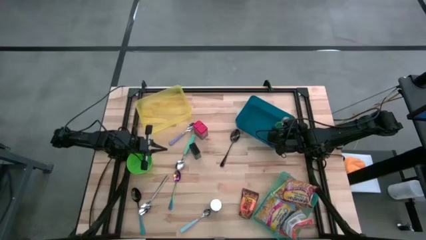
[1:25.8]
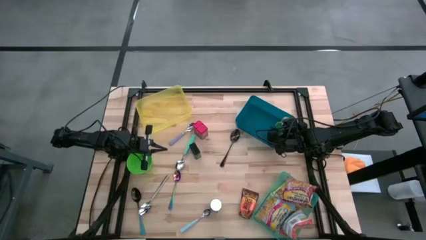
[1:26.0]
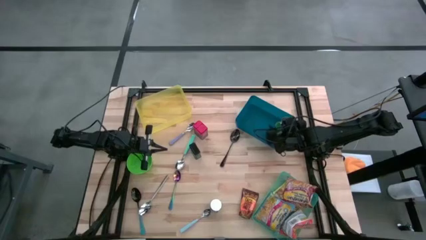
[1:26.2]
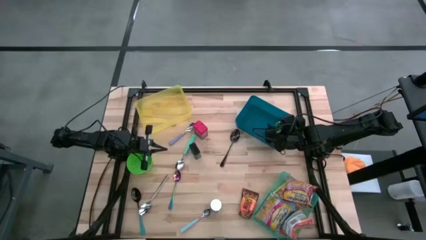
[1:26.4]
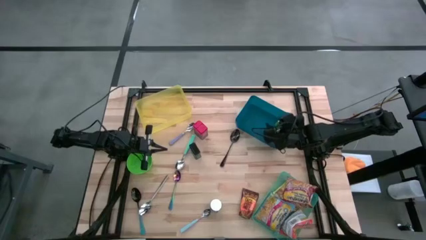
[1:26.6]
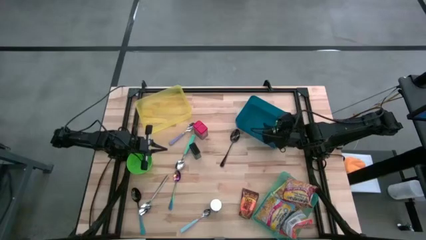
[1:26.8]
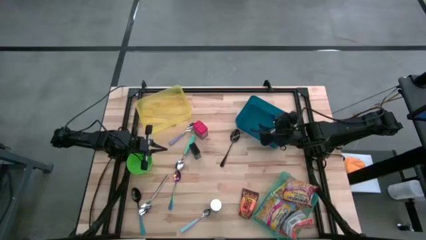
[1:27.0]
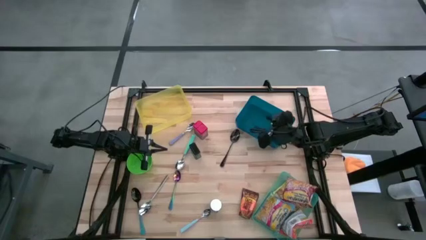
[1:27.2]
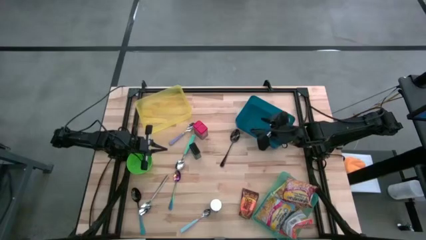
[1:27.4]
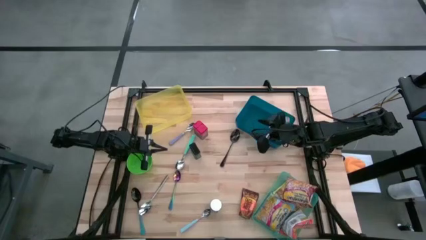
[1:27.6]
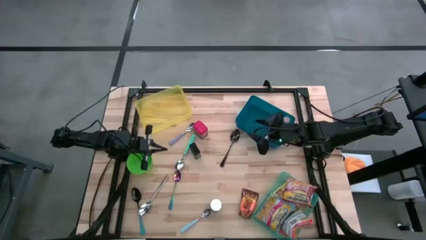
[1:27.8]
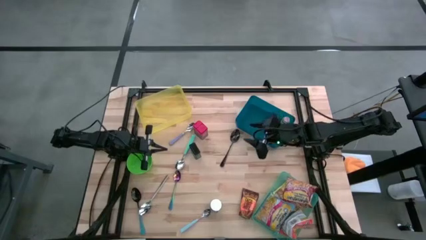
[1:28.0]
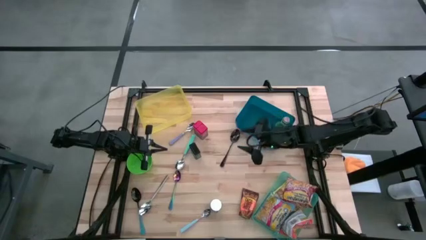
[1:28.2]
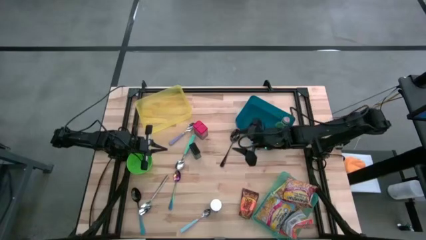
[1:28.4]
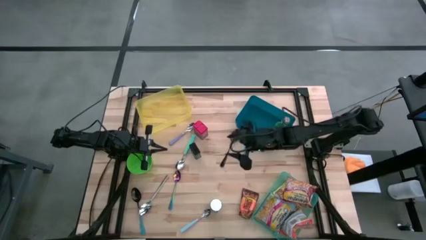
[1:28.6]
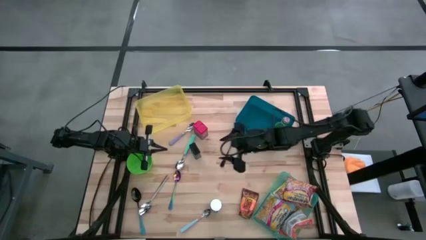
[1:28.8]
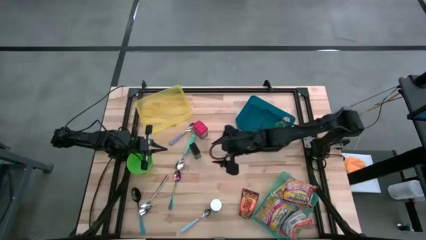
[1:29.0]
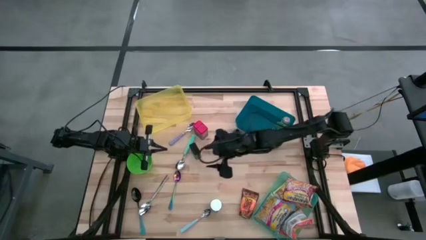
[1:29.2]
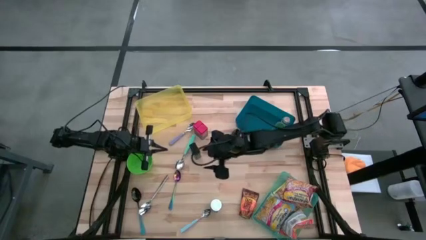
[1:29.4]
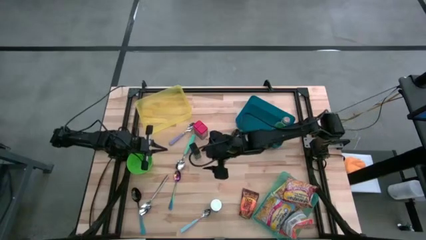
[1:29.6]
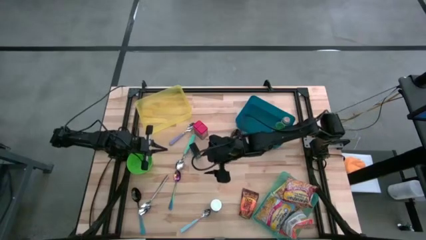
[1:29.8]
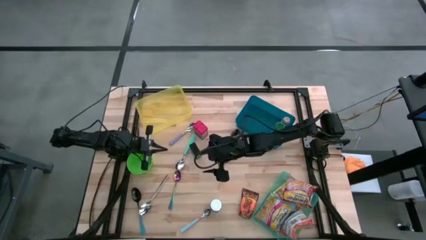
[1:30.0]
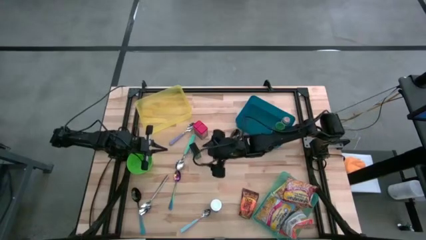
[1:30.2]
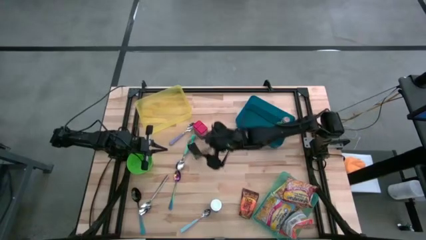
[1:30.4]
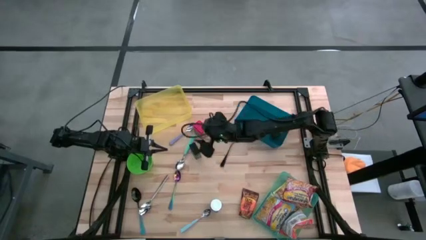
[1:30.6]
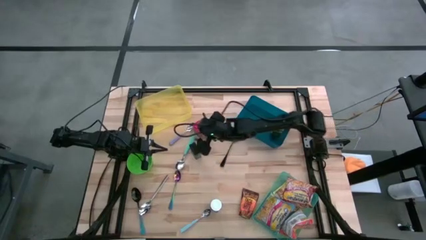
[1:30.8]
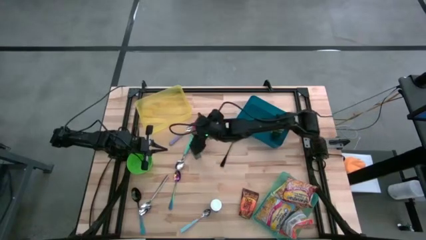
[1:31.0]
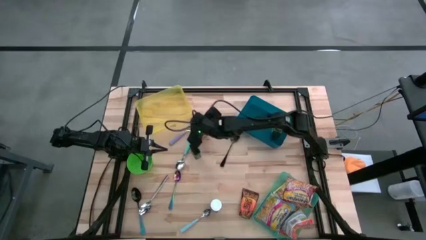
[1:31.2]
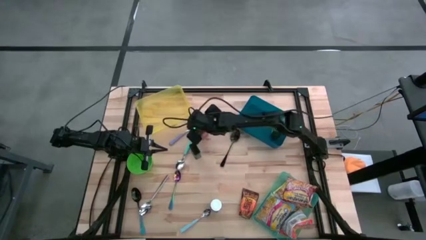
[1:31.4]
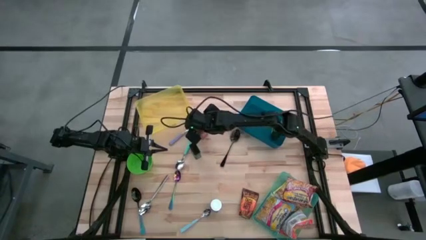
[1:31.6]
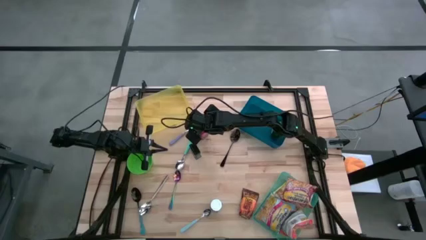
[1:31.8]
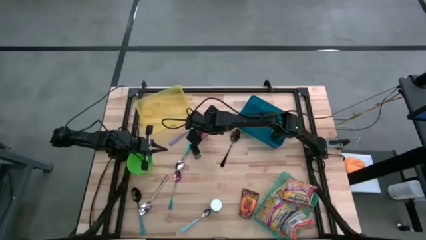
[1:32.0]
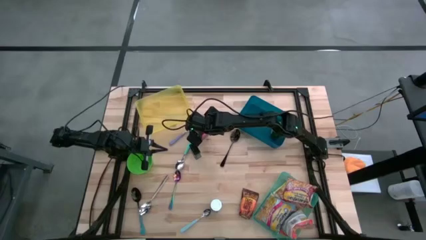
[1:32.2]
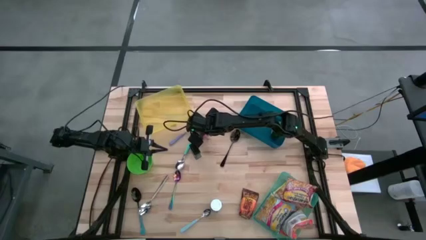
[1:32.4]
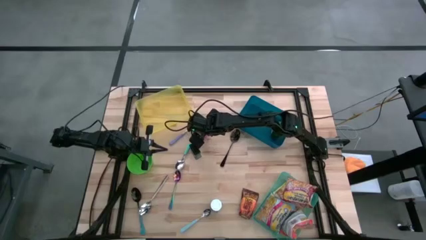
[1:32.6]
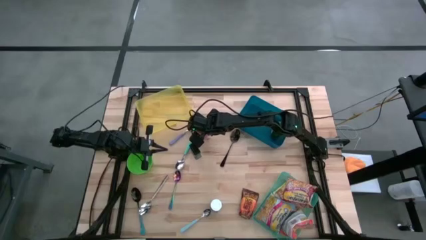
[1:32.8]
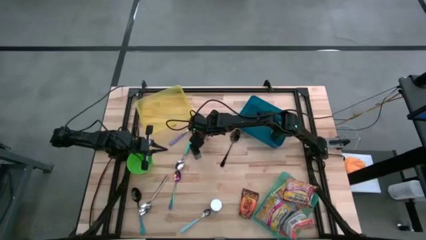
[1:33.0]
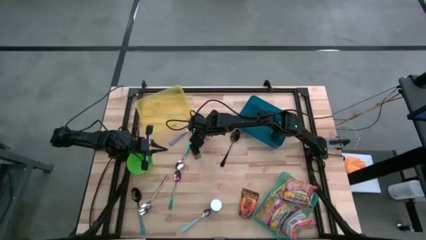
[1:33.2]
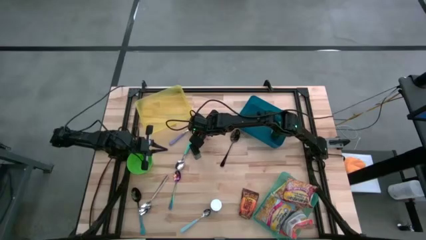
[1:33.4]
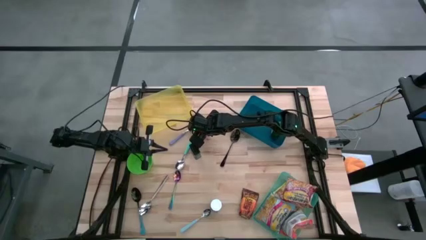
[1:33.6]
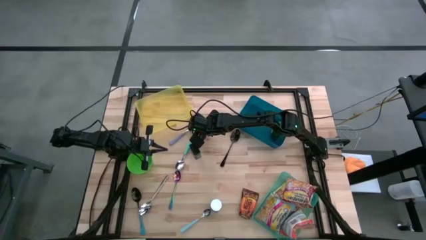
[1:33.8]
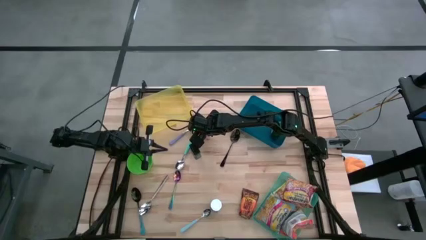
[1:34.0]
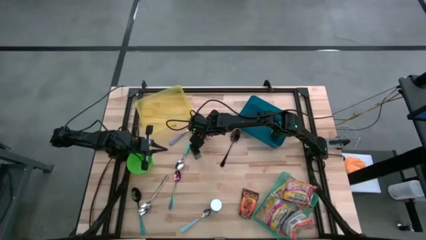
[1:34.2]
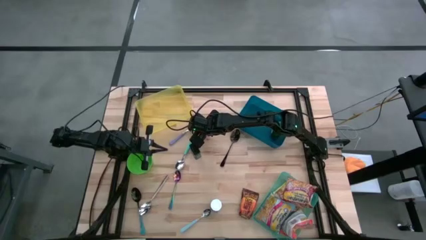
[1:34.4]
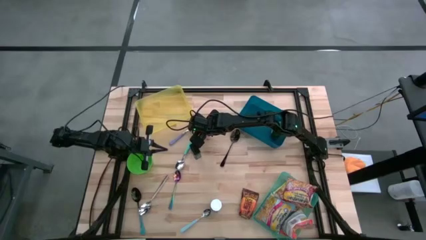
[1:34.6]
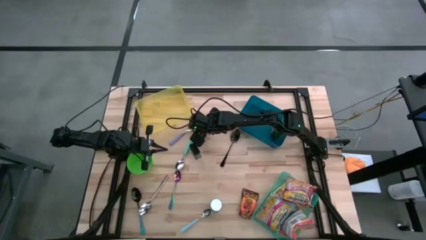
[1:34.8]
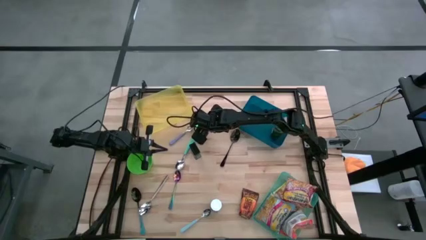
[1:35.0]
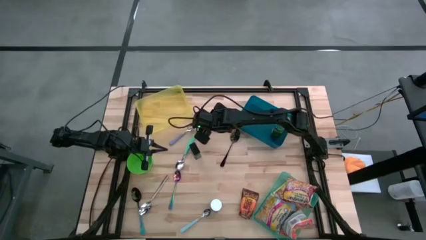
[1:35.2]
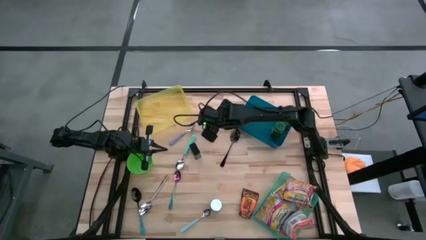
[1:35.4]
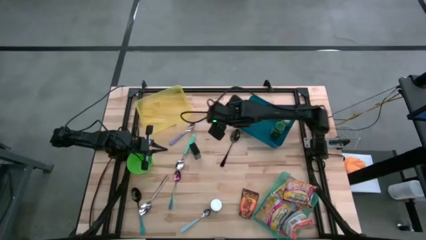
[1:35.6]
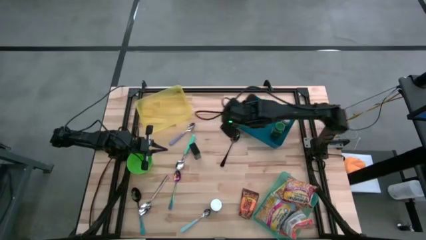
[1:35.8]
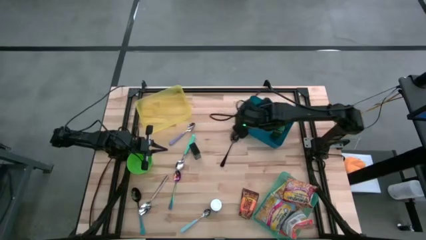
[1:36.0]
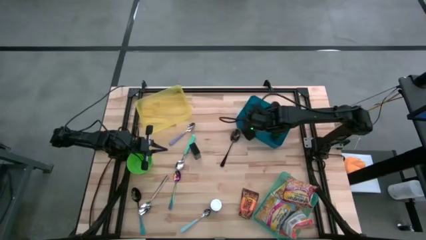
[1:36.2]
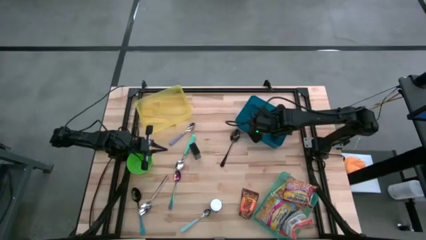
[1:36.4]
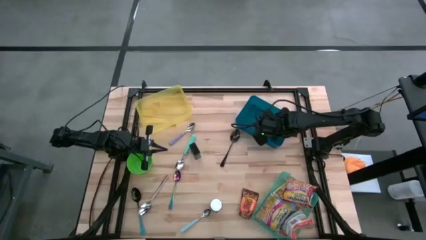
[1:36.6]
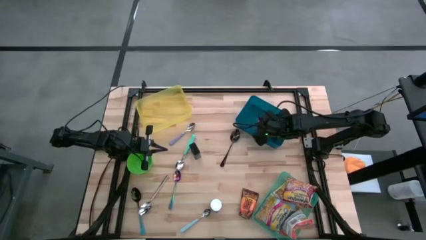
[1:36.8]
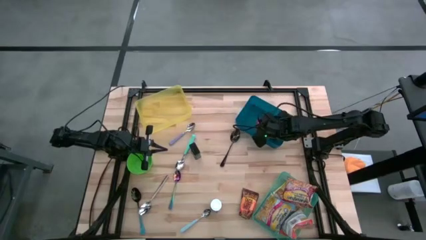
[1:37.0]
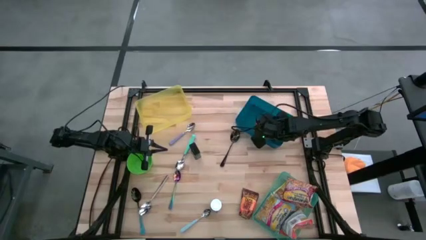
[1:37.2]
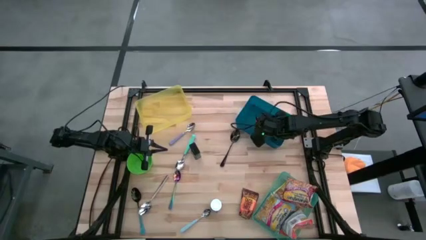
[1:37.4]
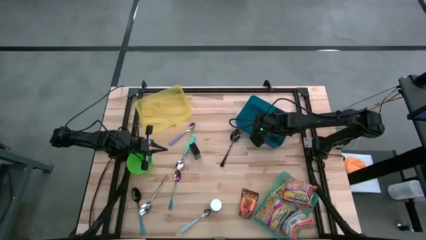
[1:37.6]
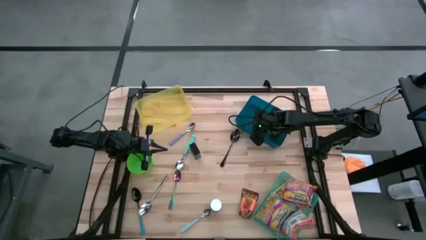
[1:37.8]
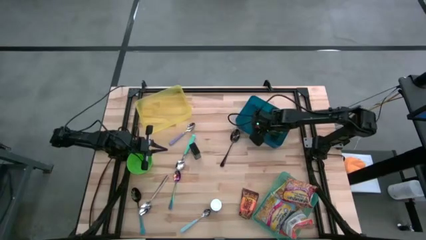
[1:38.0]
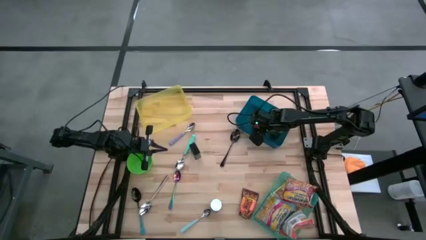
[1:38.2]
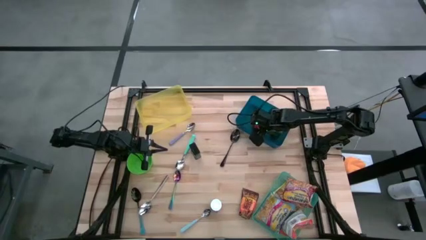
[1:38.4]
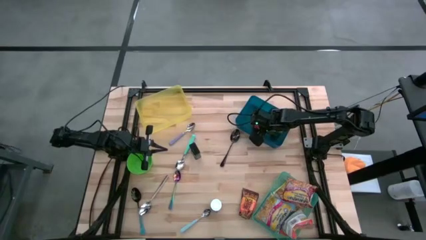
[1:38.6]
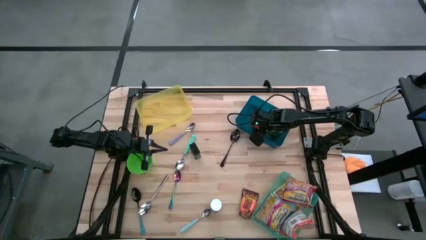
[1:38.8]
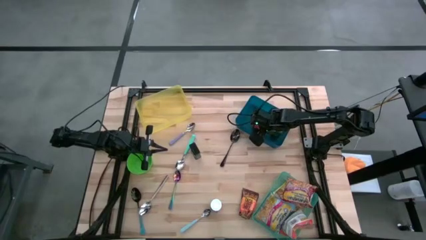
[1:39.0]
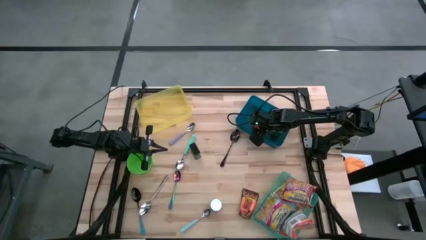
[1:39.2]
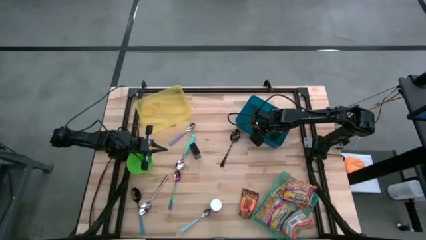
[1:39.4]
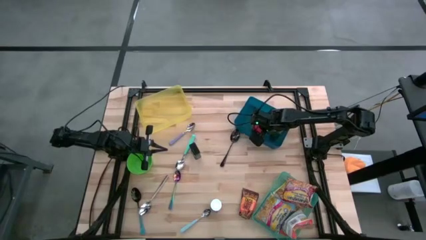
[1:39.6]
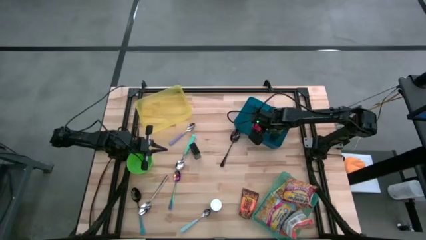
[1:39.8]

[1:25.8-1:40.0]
Put the red seasoning can into the blue bin
